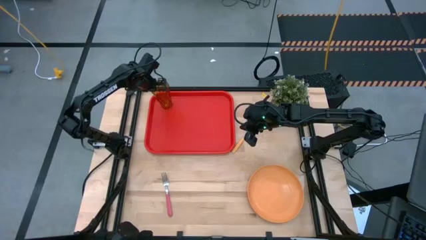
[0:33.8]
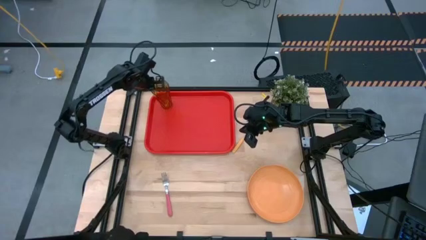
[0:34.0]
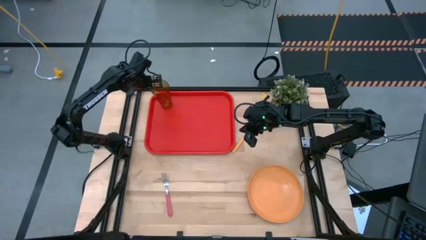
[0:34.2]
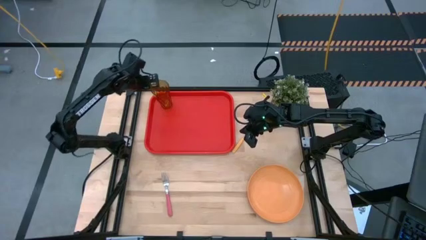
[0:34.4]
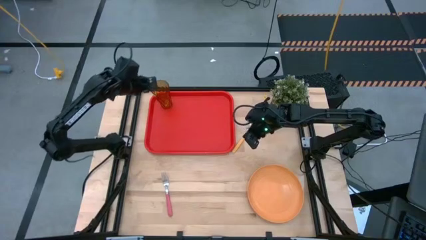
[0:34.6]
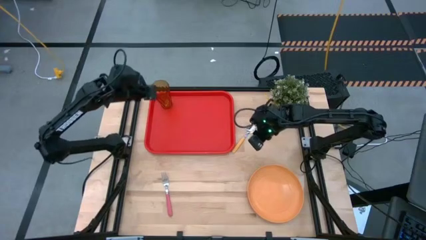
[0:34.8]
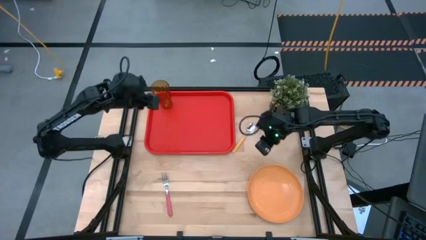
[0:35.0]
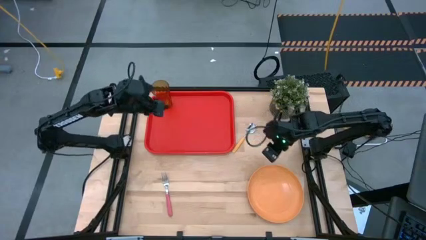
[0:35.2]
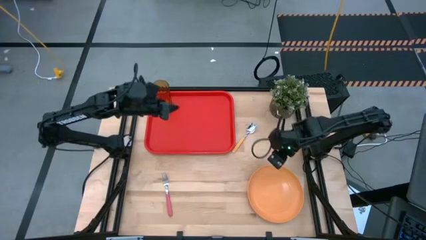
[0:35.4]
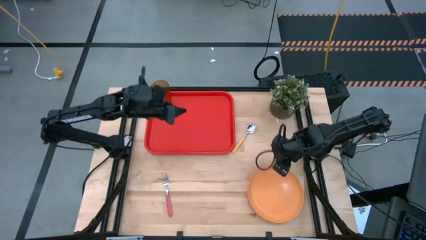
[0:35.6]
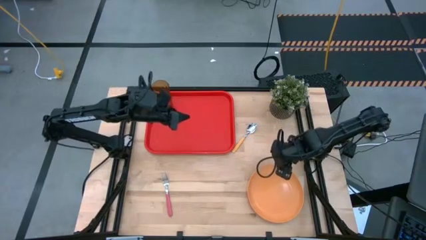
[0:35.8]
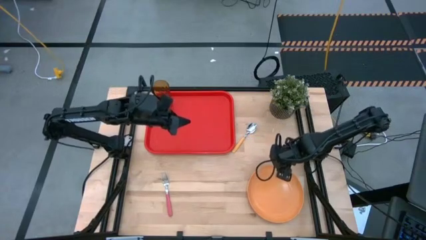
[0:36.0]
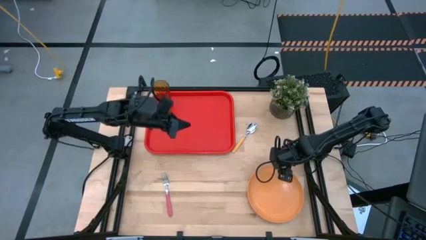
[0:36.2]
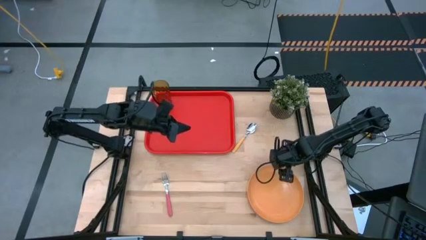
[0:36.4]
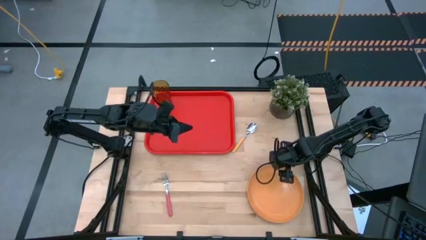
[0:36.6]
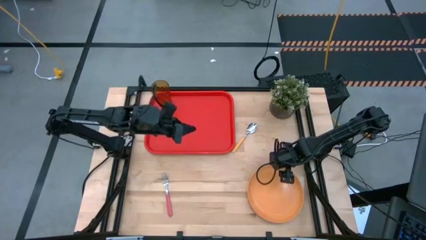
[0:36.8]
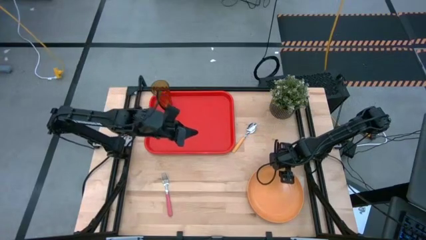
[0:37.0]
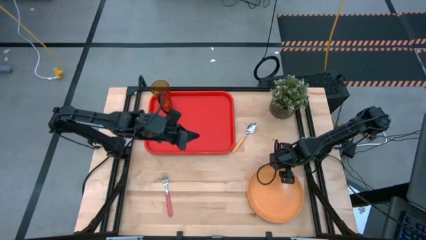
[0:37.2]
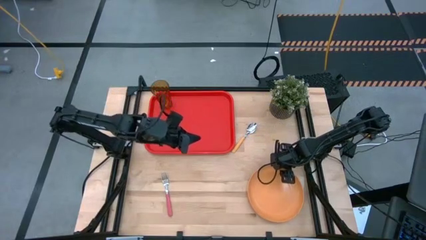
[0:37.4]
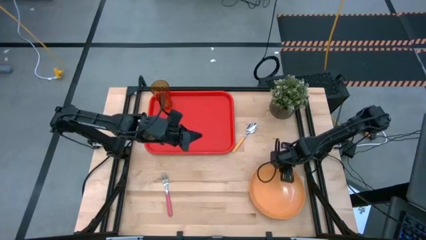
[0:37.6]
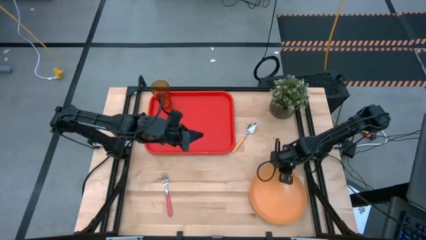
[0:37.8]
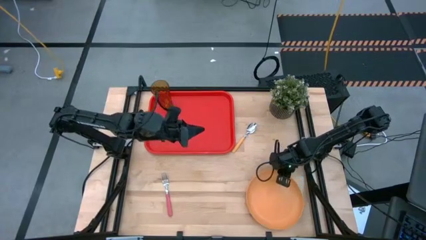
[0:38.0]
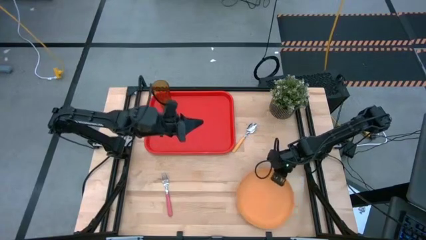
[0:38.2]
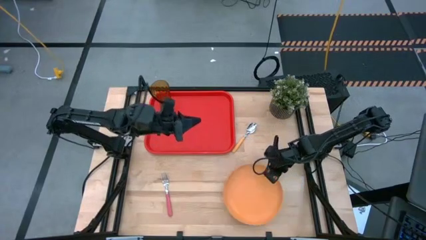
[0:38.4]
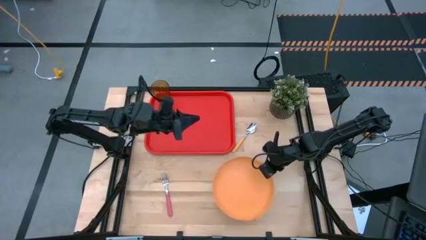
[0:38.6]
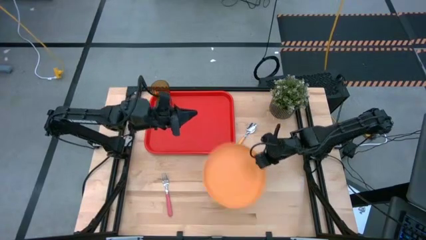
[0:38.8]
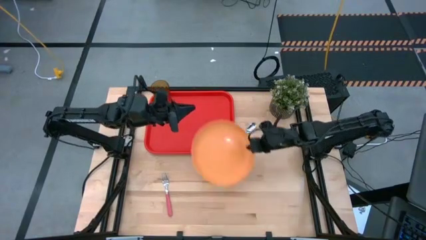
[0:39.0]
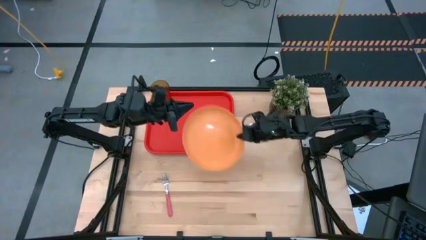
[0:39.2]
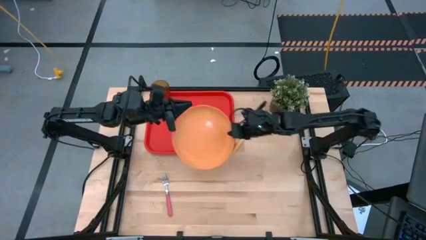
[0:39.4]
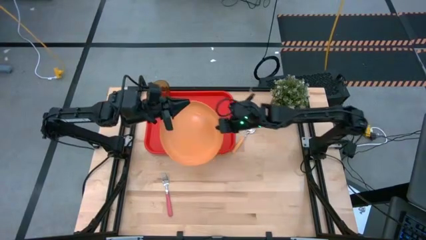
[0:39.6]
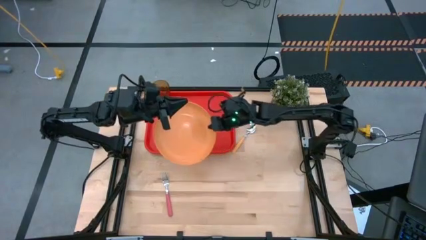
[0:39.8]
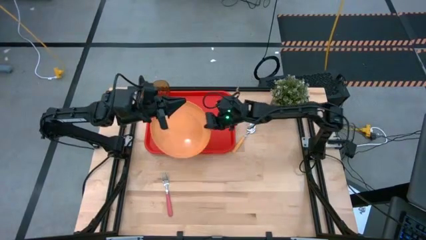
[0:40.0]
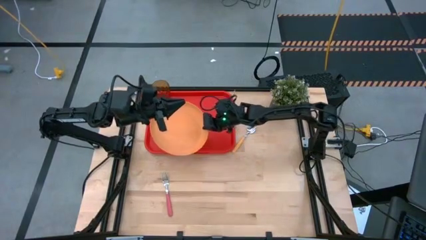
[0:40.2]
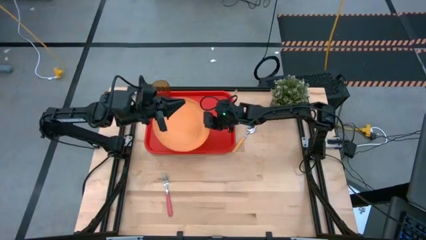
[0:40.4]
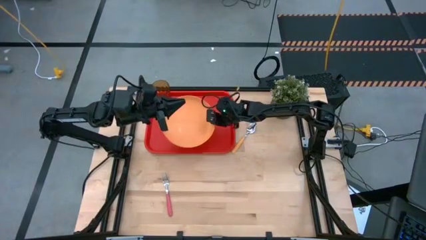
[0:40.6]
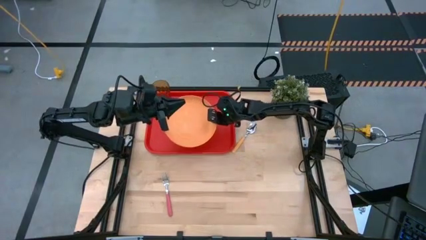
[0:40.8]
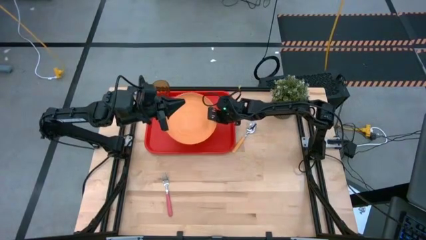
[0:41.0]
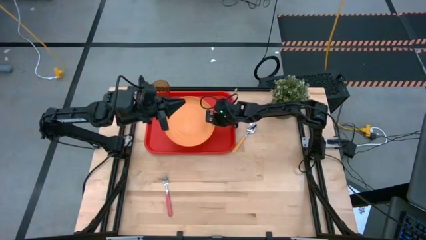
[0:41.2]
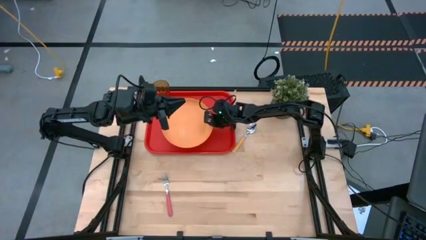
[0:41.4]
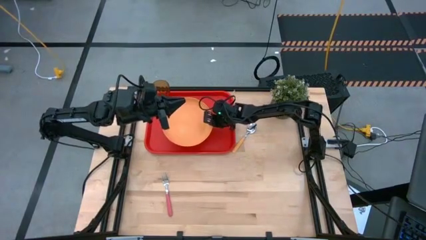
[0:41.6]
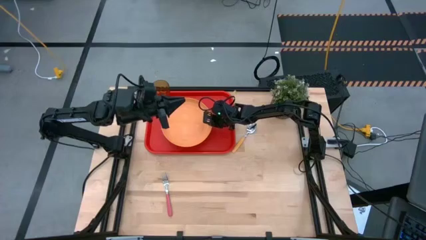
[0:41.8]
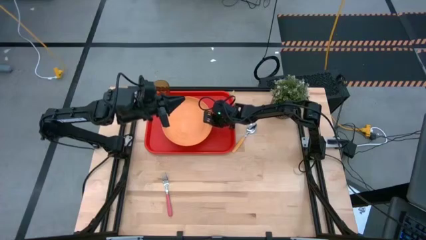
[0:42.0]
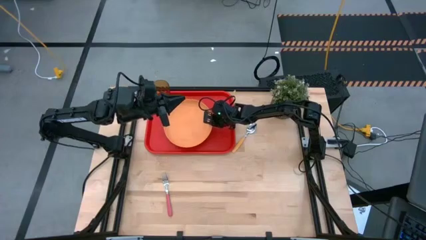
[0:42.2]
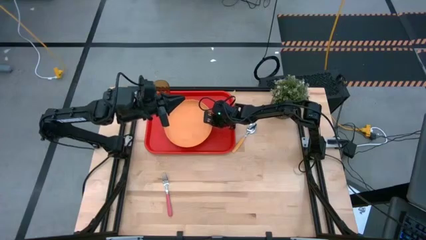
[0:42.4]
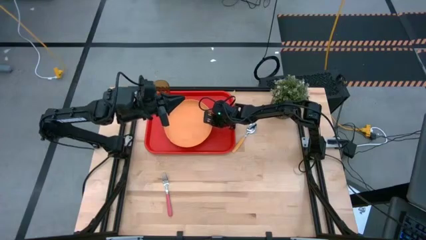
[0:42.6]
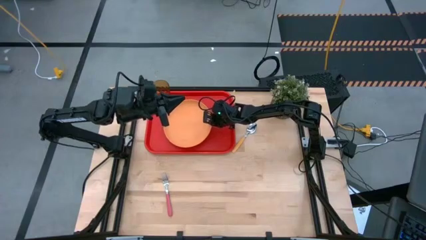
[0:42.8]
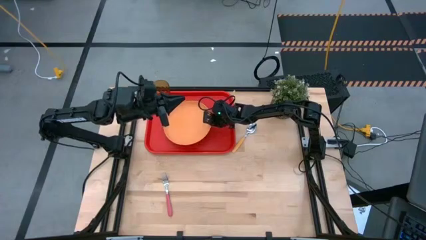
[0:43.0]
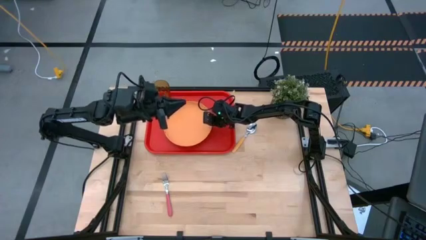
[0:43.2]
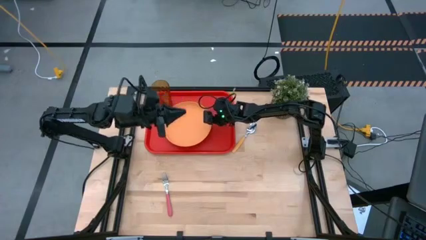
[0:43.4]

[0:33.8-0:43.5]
Task: Pick and place plate/cup/fork/spoon on tray
Put the orange plate on the red tray to the bottom right of the orange cup

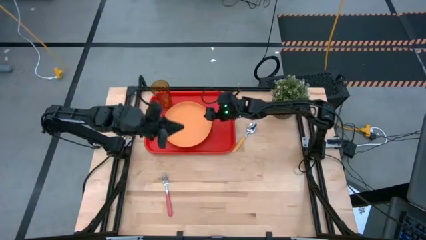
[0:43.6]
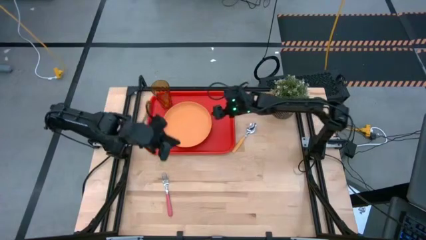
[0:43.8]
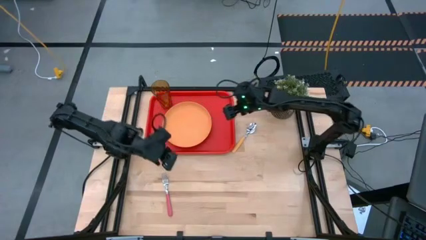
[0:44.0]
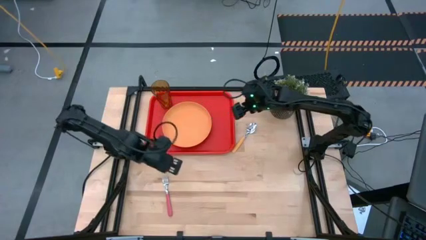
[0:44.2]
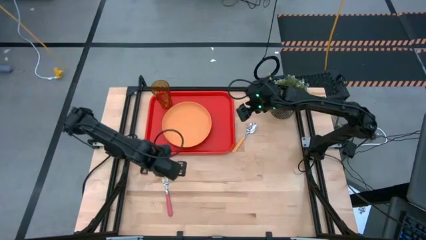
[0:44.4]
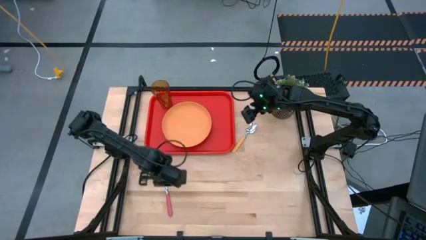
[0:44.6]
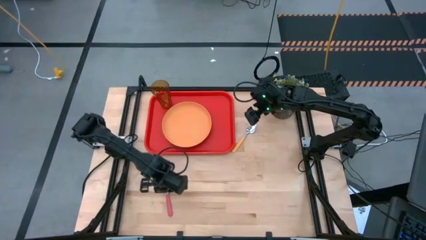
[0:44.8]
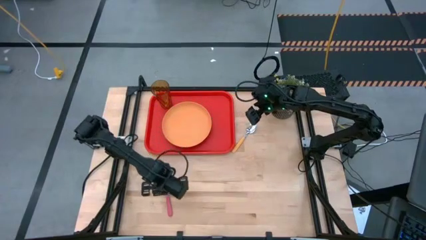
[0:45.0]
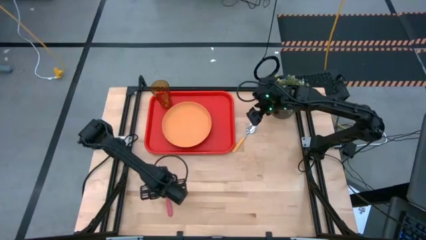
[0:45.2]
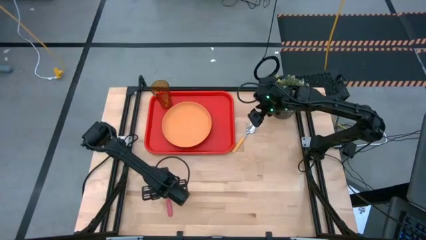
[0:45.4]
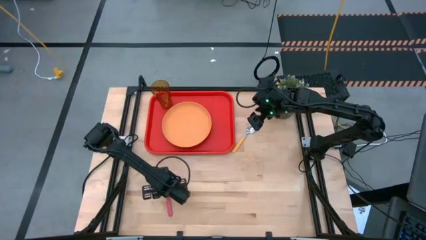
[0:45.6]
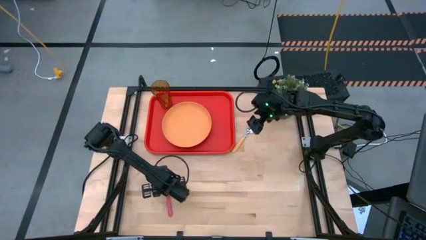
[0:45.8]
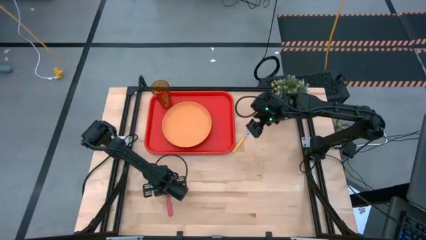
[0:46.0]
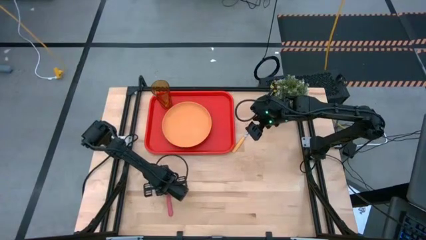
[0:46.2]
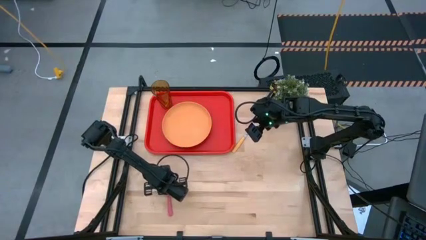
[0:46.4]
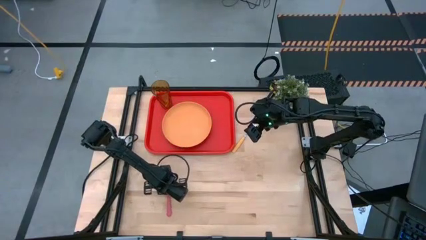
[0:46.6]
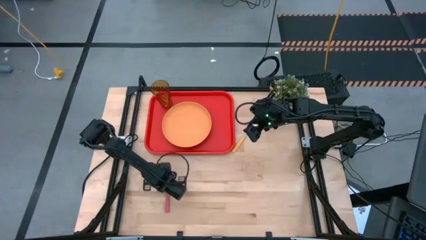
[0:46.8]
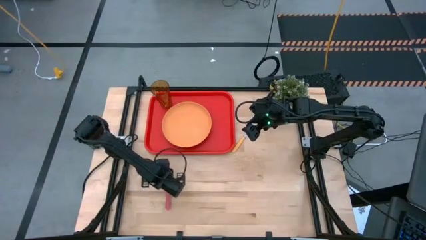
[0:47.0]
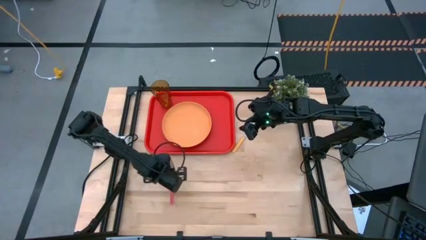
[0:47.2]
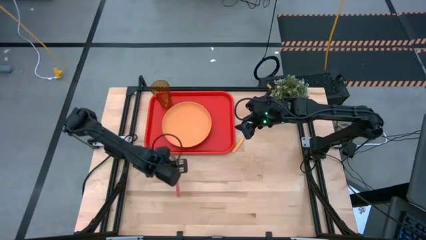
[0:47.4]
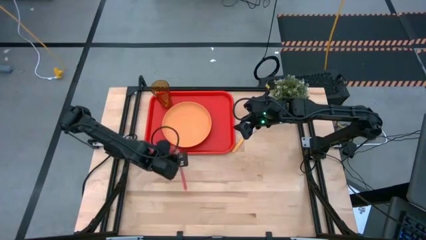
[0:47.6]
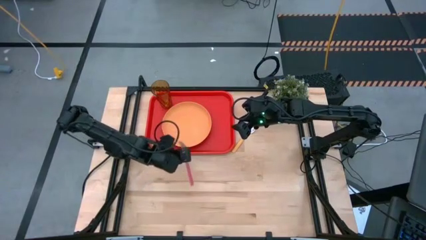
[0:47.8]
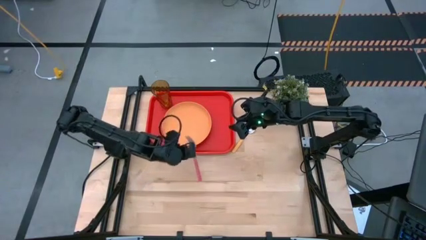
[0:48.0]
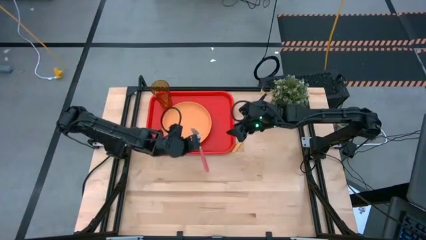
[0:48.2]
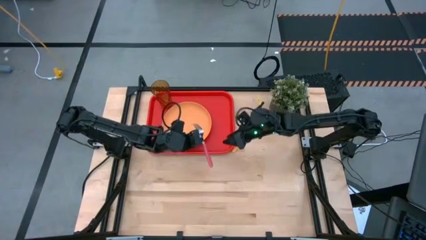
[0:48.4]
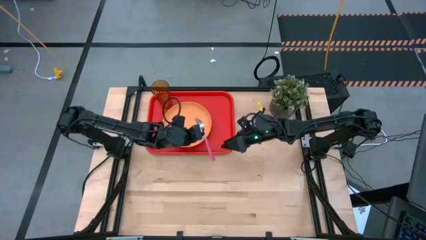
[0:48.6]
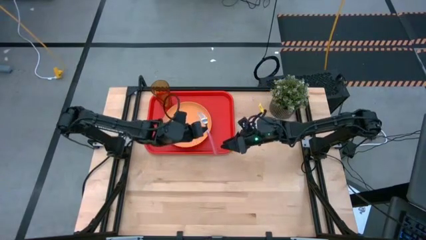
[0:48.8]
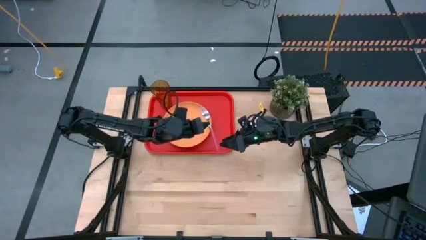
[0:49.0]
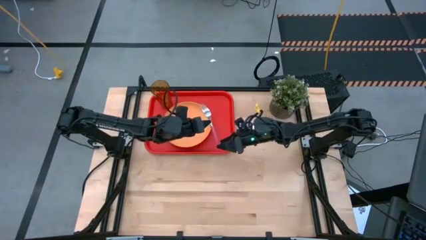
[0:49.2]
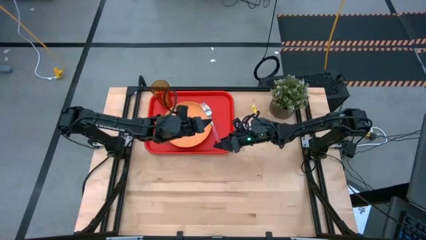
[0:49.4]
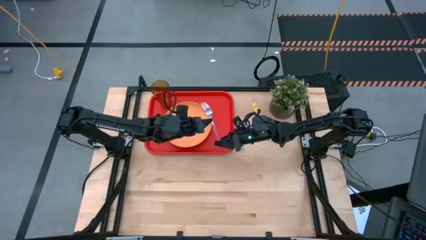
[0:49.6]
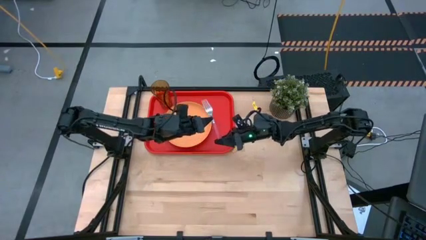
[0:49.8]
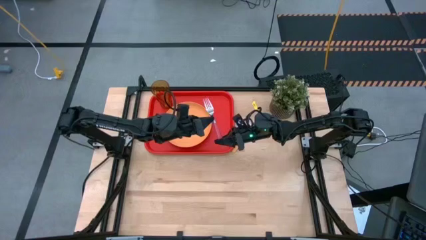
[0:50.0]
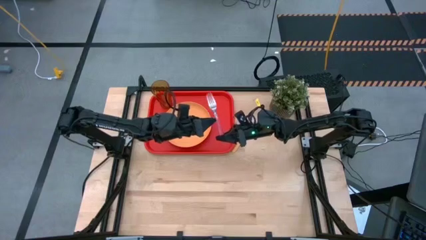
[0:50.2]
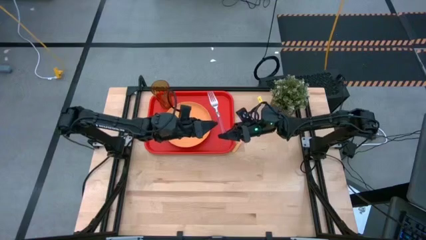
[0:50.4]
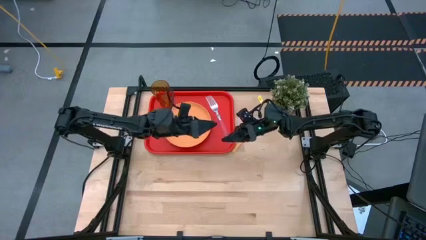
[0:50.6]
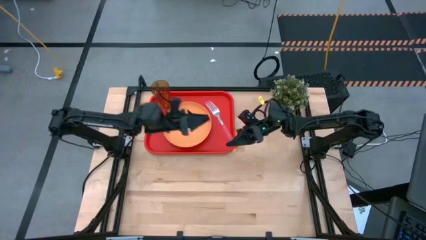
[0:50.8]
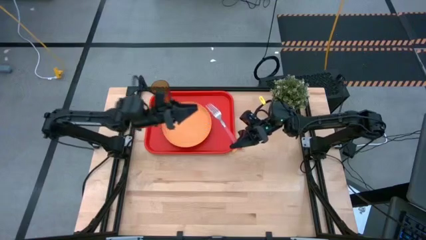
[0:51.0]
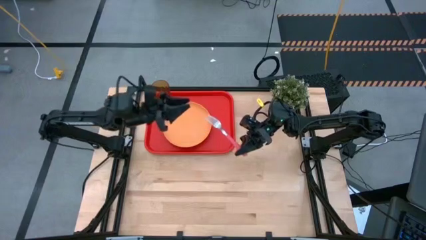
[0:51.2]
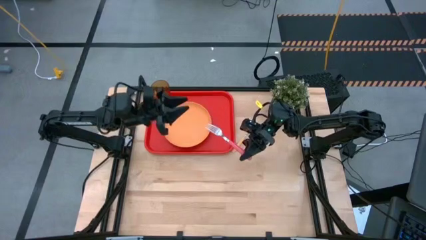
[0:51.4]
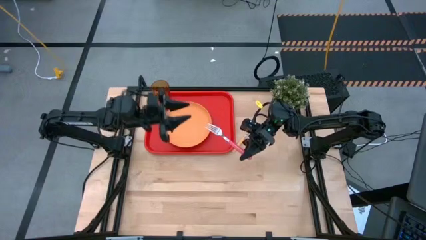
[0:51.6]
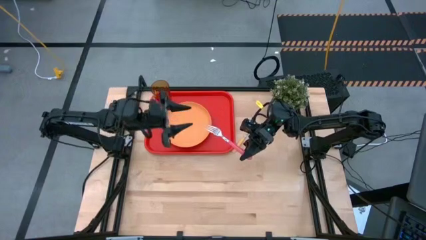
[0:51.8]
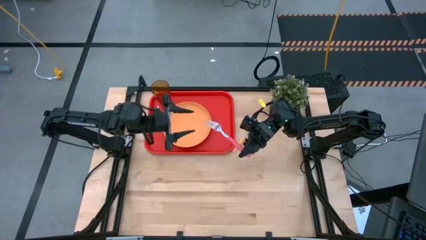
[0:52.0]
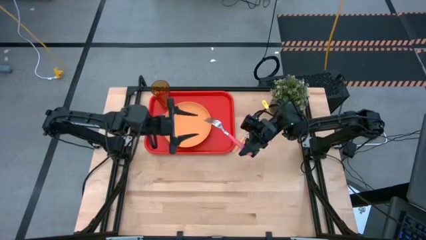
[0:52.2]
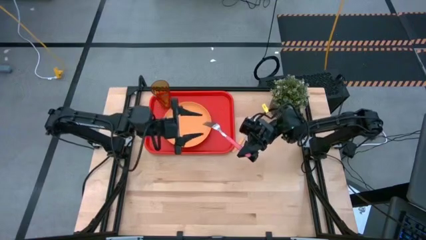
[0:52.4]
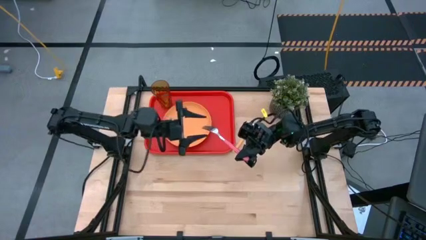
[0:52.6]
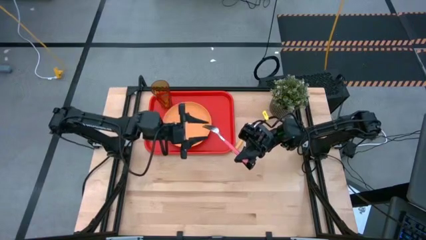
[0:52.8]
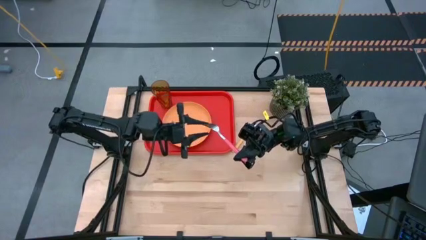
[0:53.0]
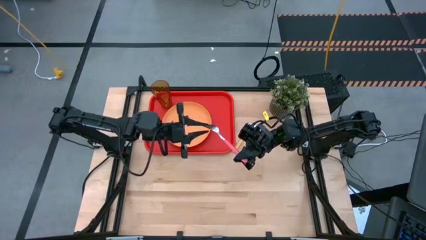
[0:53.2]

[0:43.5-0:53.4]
Put the pink fork on the red tray to the right of the orange plate
